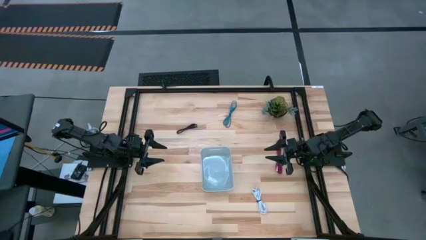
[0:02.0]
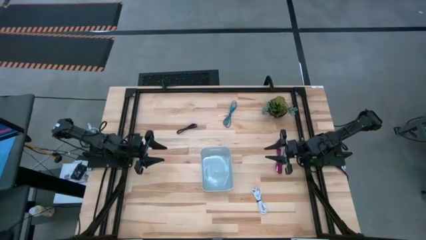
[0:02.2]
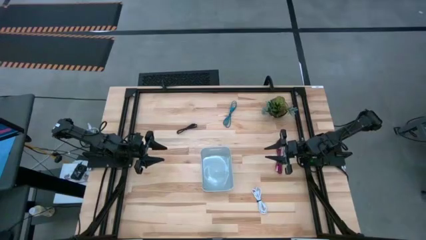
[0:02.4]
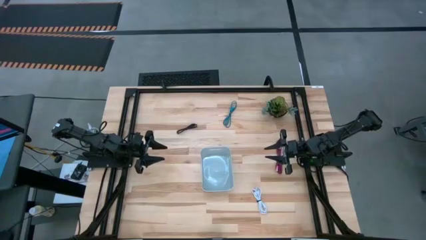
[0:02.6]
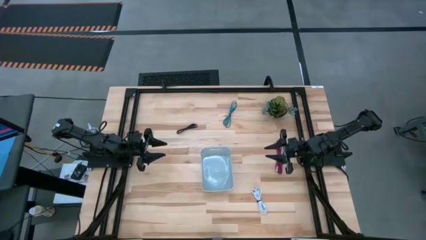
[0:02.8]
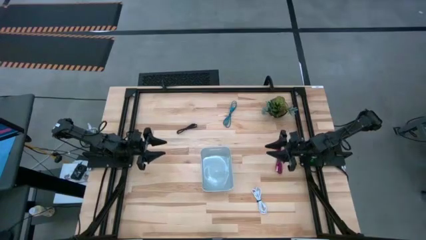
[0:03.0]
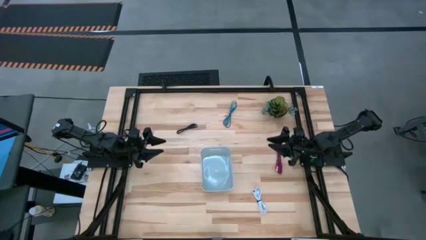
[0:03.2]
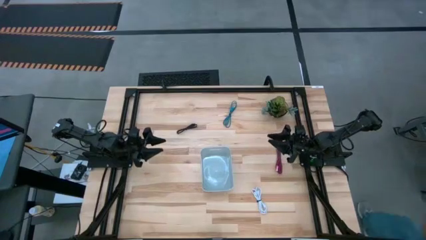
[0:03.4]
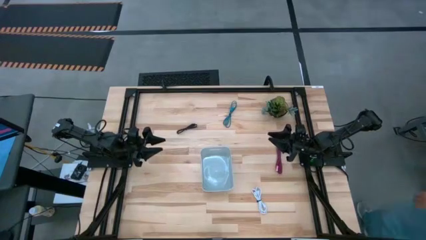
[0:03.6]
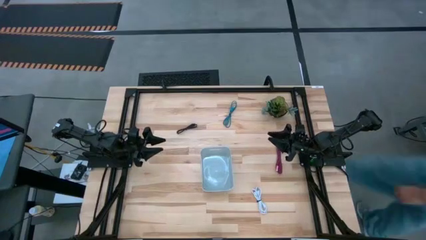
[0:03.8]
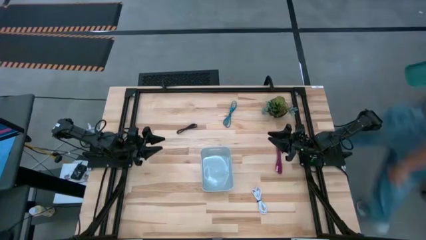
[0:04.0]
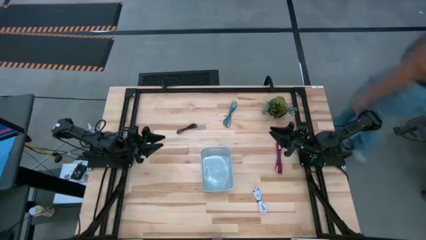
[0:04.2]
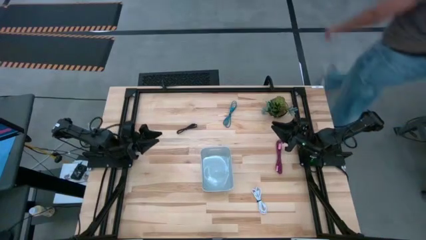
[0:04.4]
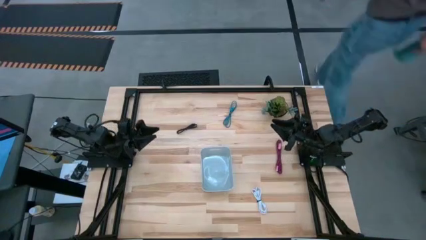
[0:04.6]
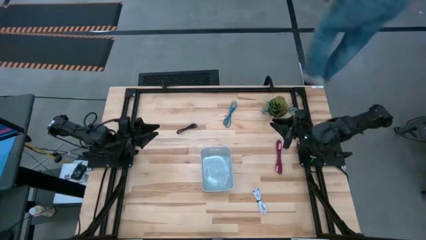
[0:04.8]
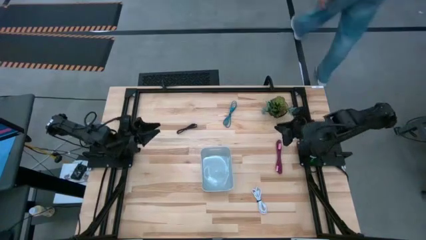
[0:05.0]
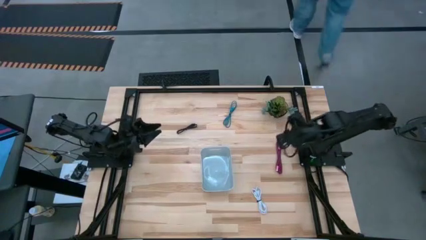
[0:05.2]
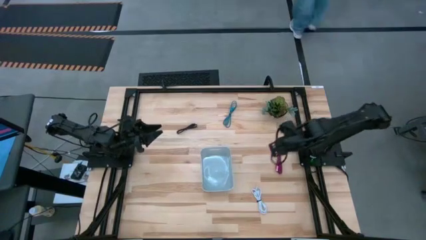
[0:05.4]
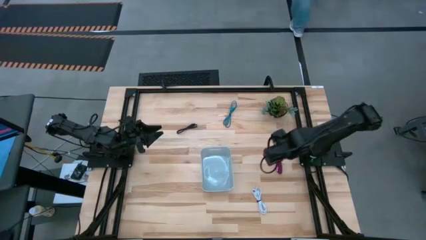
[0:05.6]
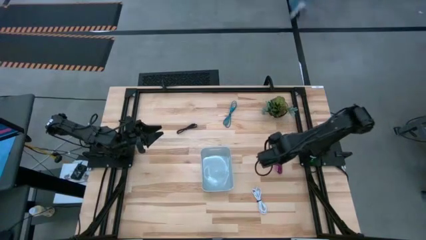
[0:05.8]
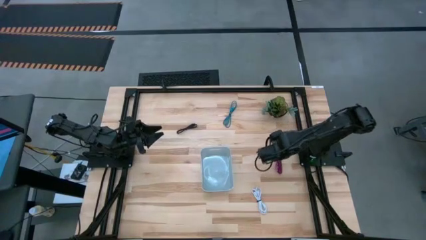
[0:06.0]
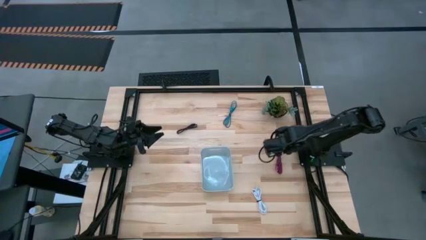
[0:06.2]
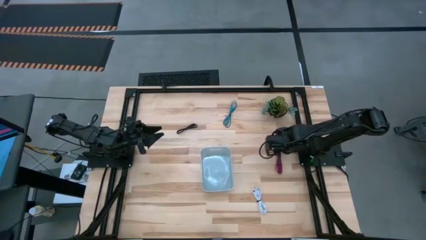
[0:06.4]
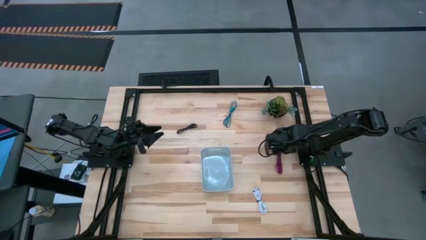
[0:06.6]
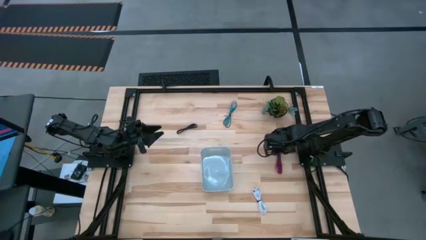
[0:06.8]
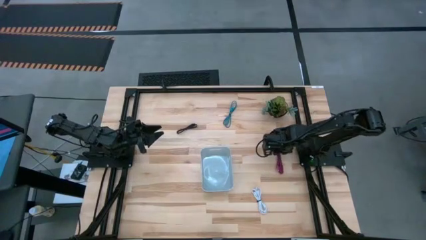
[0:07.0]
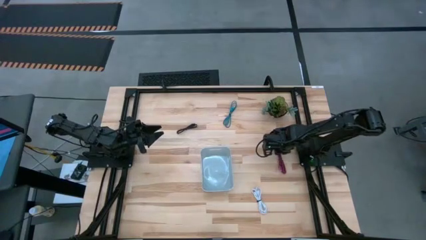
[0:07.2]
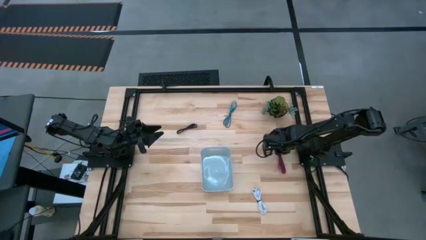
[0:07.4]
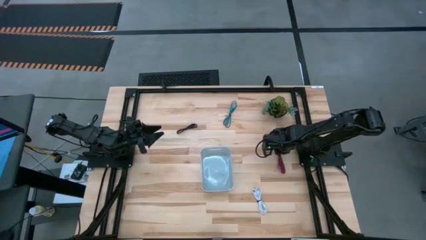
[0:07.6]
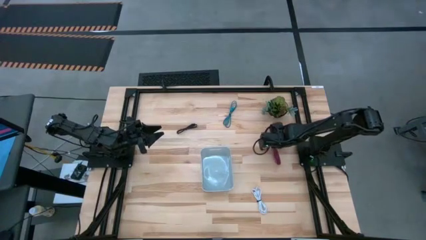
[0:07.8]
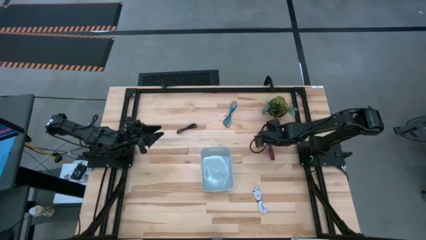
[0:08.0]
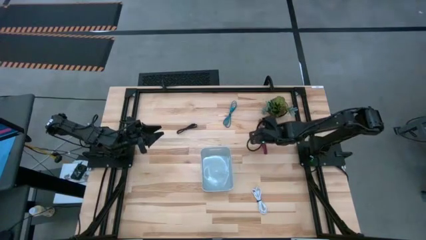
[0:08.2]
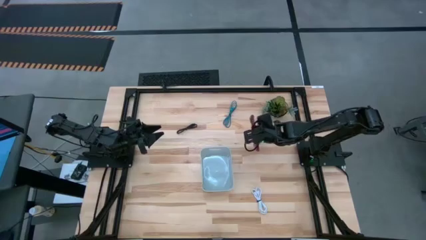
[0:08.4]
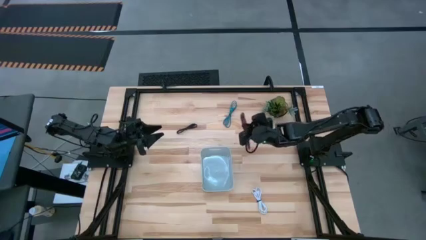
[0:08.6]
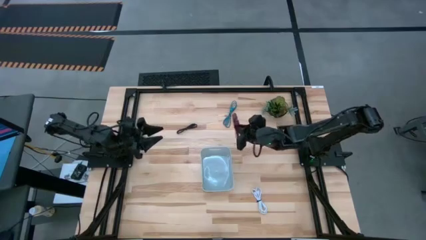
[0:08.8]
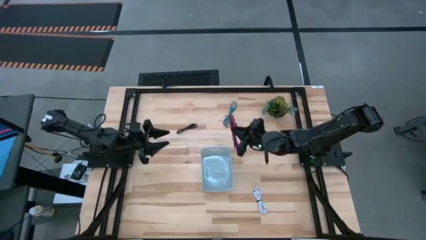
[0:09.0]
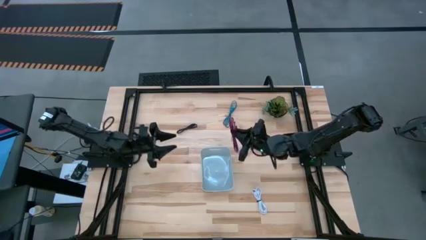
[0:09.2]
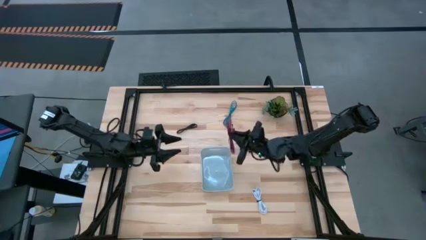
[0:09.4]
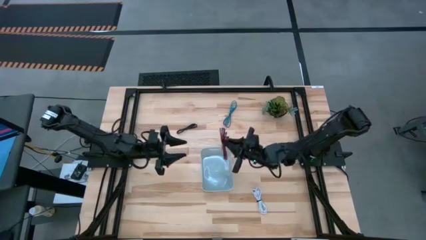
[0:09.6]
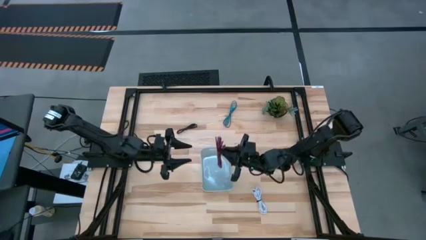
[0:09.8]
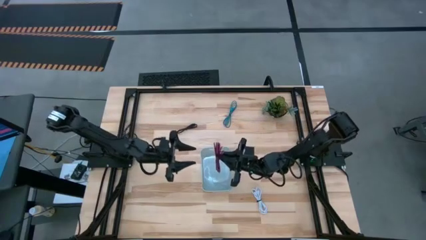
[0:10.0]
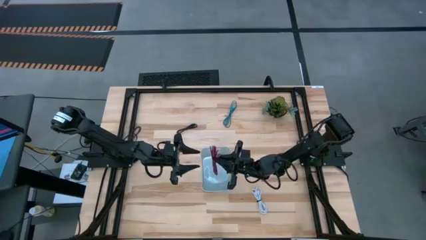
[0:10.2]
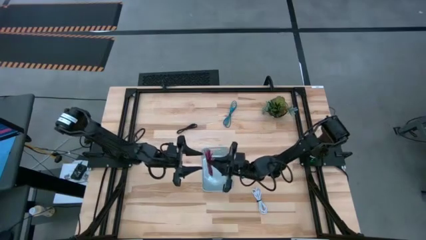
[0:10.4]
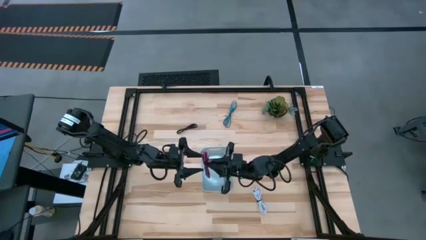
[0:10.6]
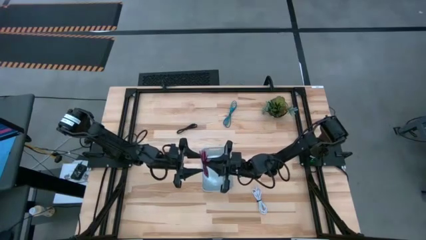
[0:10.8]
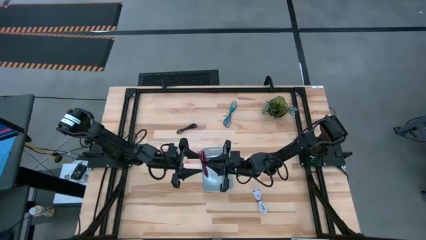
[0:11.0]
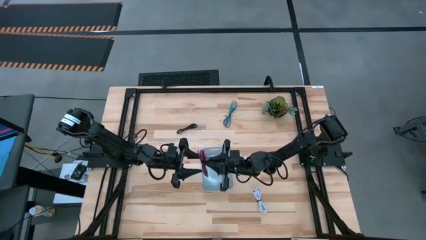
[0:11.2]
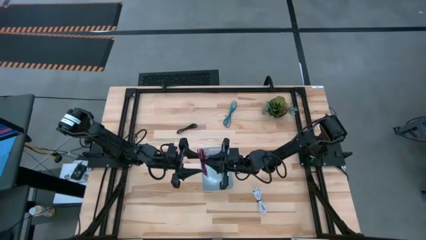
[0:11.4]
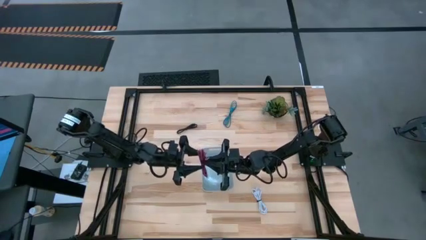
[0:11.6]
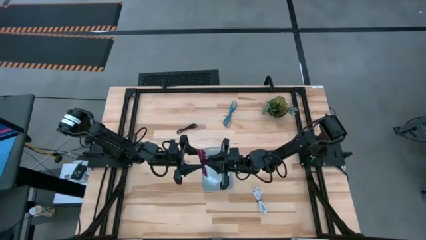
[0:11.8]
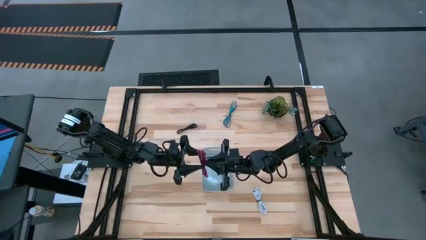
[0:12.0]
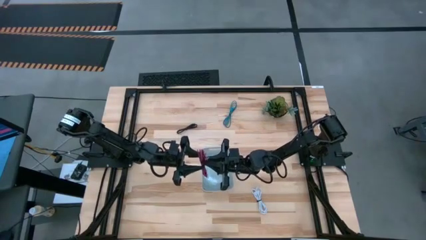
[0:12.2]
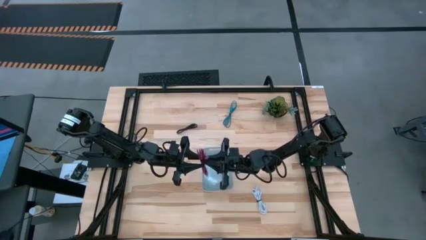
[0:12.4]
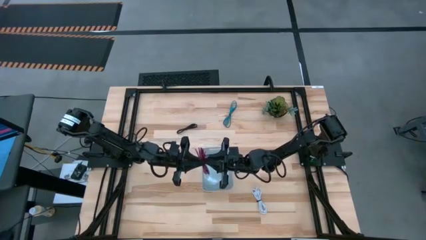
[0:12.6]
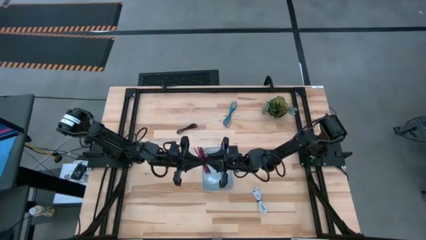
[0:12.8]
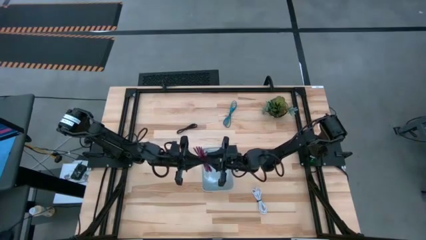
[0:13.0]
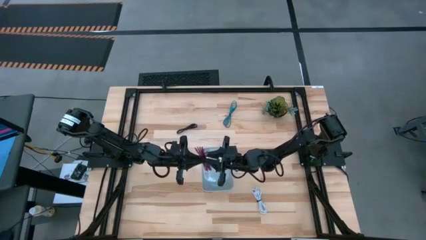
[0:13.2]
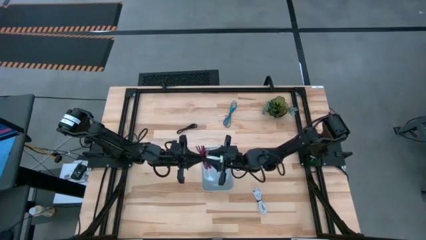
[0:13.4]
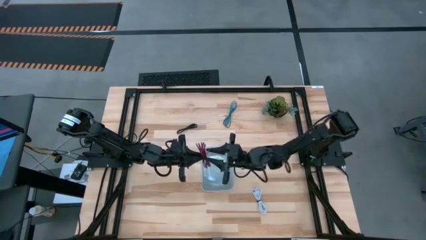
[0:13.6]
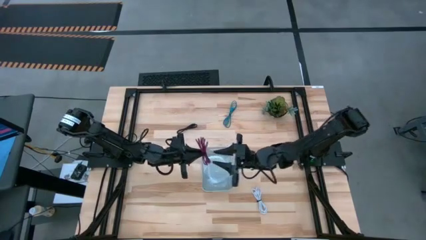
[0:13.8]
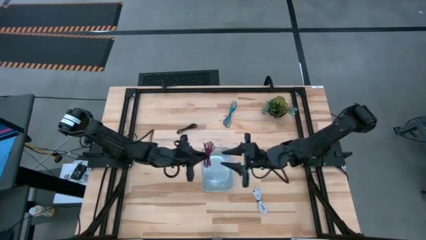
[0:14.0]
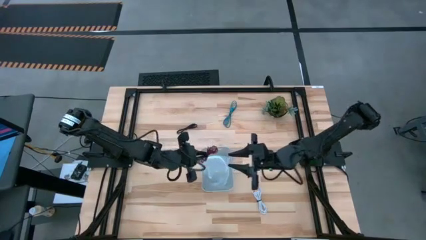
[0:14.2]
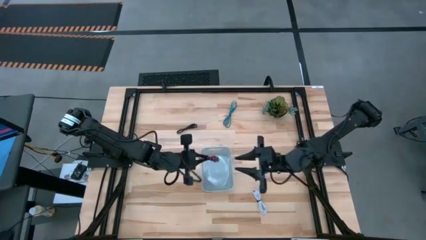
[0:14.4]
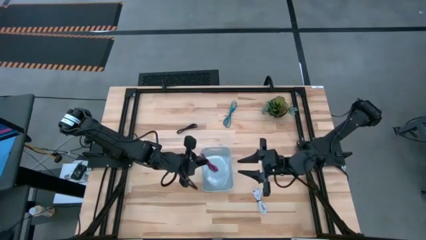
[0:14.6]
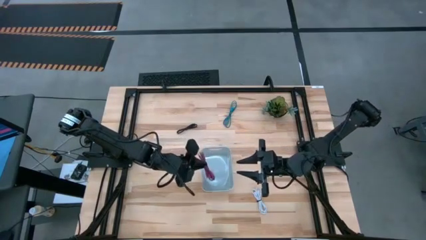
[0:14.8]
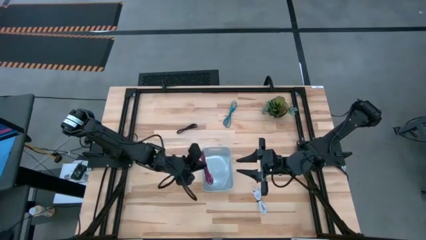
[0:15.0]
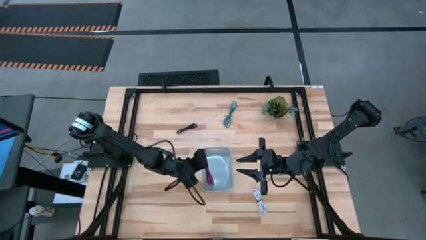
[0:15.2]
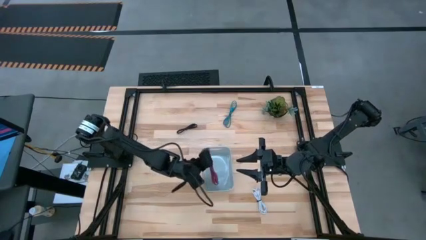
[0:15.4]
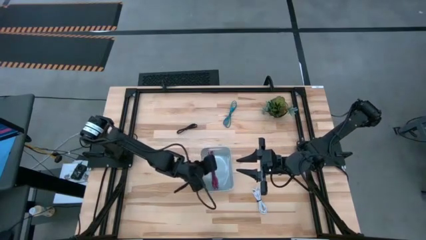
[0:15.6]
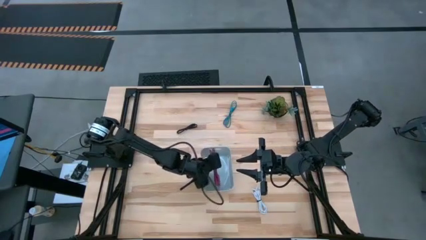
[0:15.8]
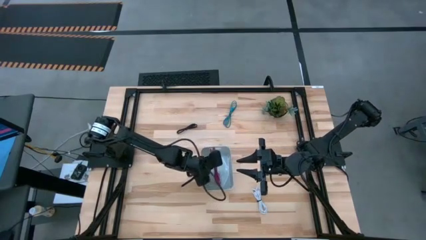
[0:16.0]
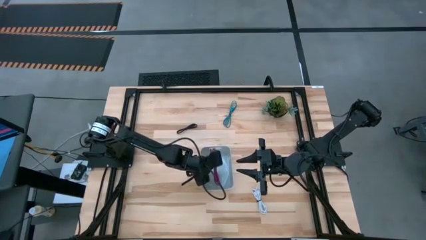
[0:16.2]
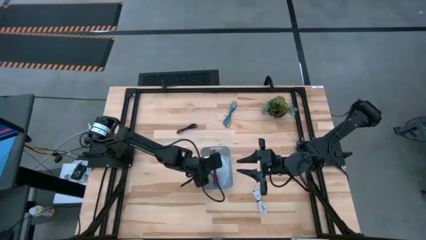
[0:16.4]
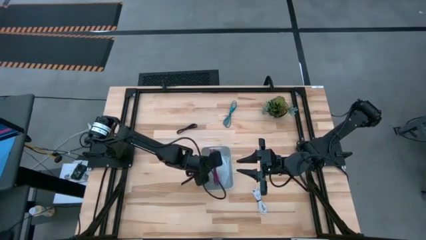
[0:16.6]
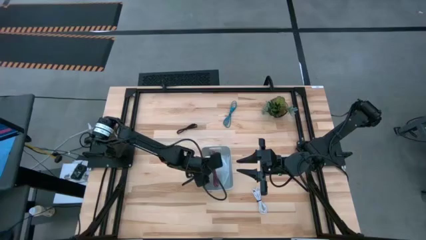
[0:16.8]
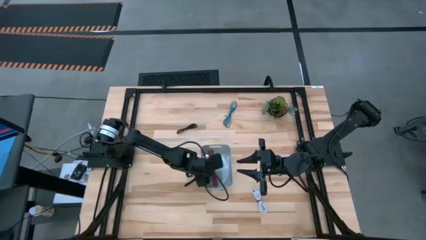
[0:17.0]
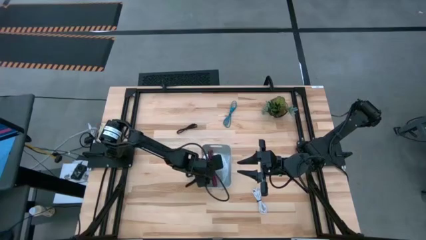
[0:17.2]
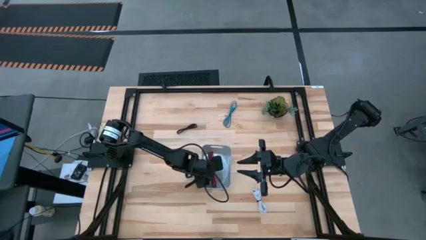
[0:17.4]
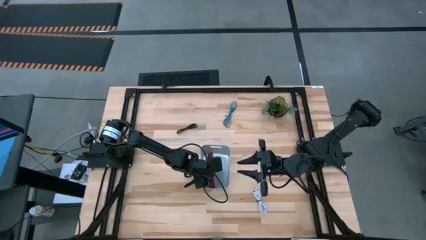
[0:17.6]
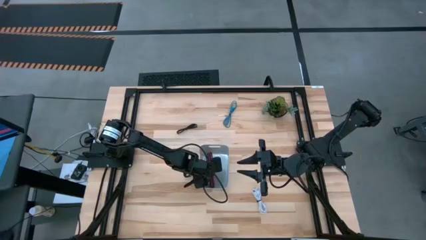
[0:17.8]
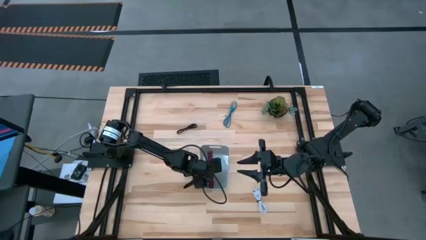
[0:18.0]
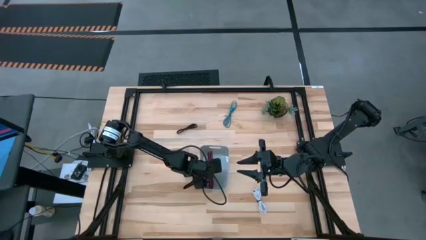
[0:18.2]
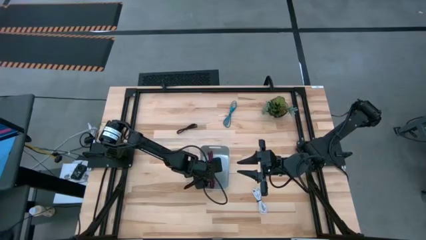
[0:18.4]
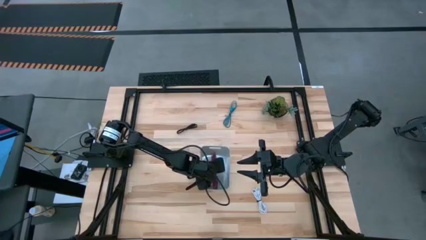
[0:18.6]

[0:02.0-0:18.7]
Task: Pick and place USB-C Cables
Put the pink charger cable into the gray bin
